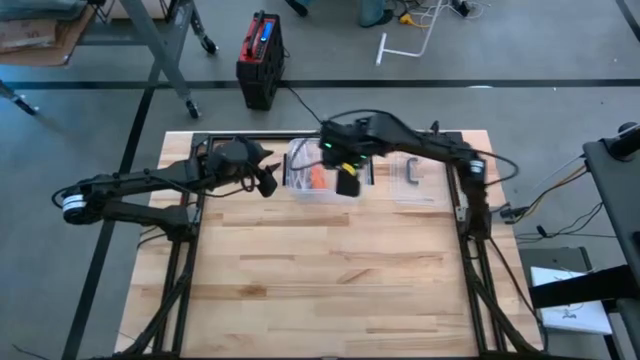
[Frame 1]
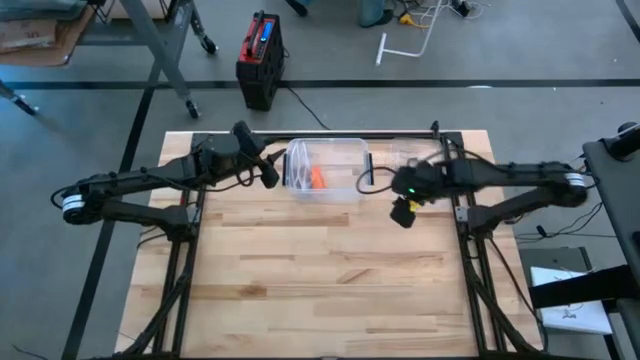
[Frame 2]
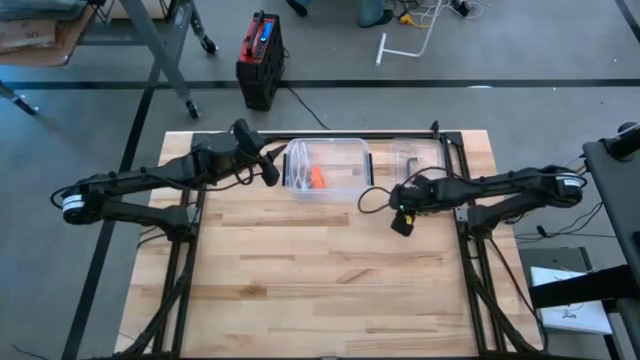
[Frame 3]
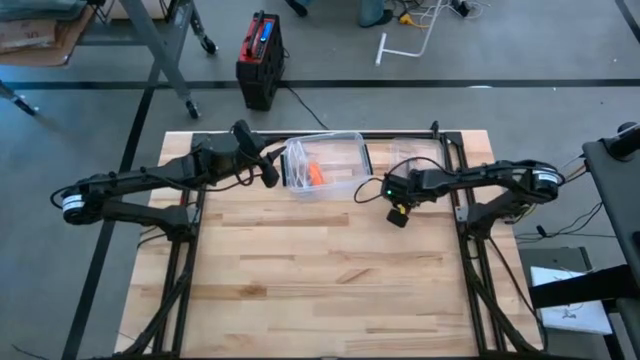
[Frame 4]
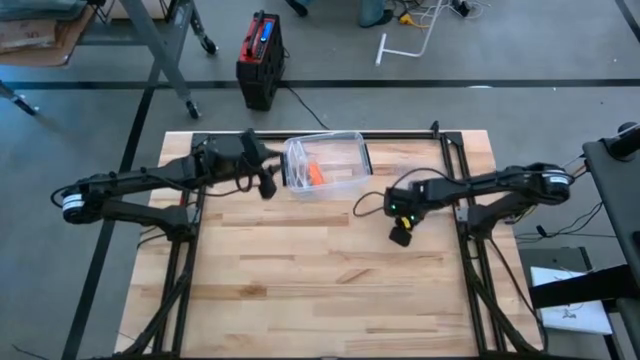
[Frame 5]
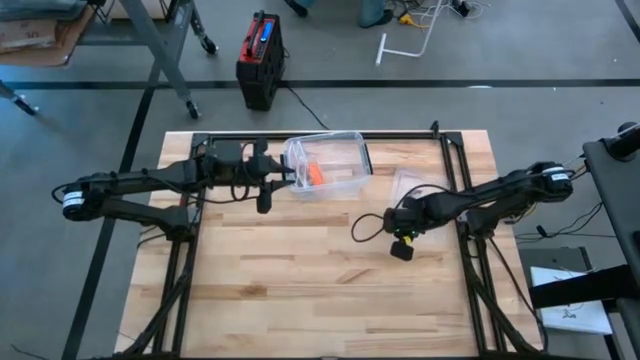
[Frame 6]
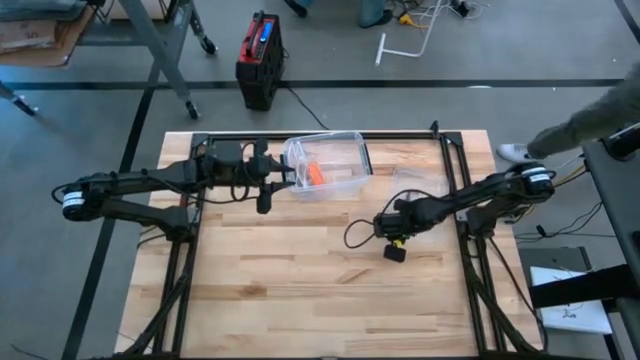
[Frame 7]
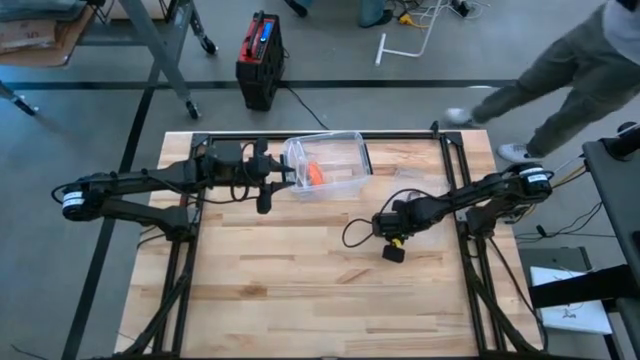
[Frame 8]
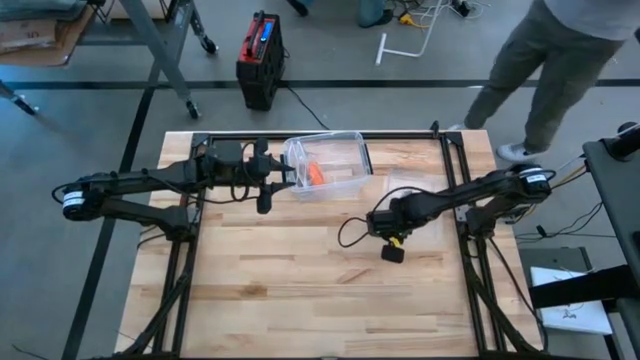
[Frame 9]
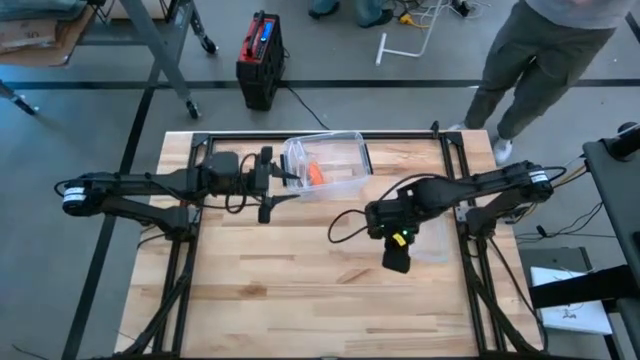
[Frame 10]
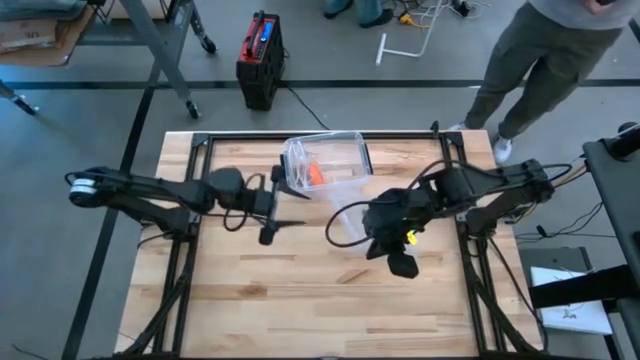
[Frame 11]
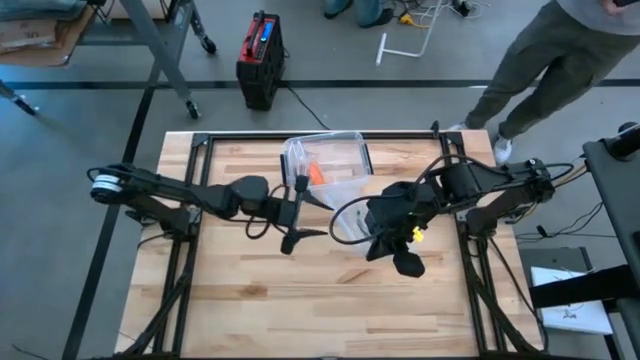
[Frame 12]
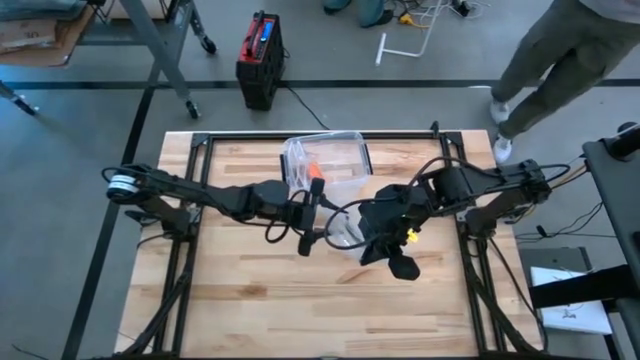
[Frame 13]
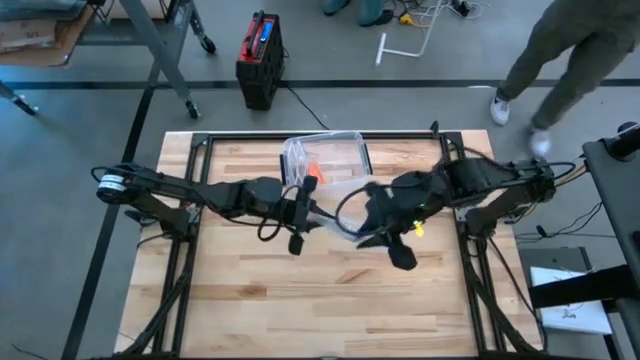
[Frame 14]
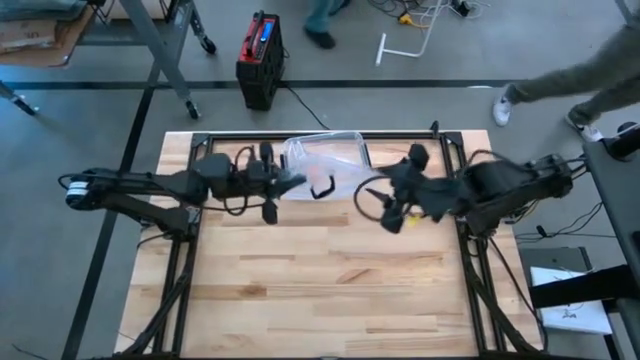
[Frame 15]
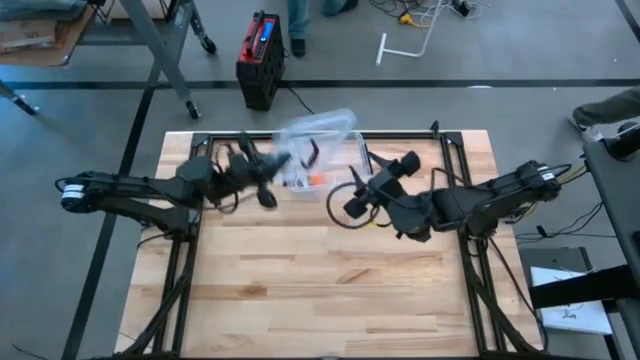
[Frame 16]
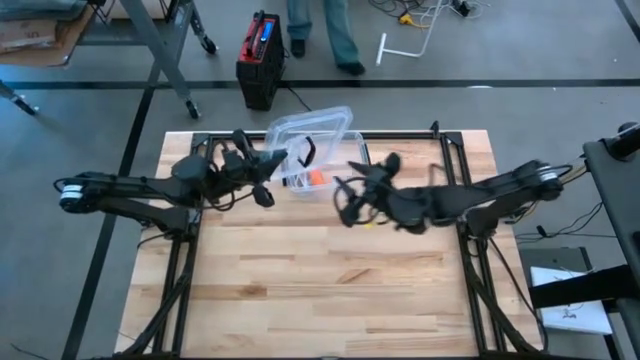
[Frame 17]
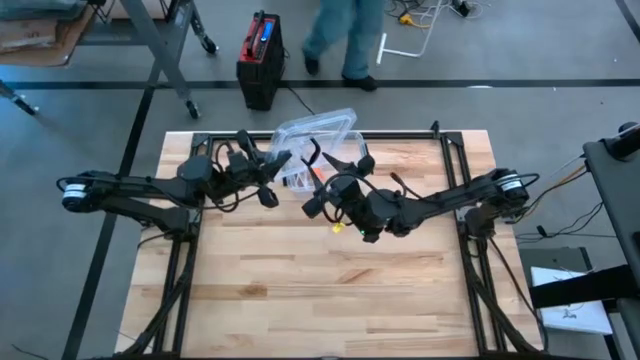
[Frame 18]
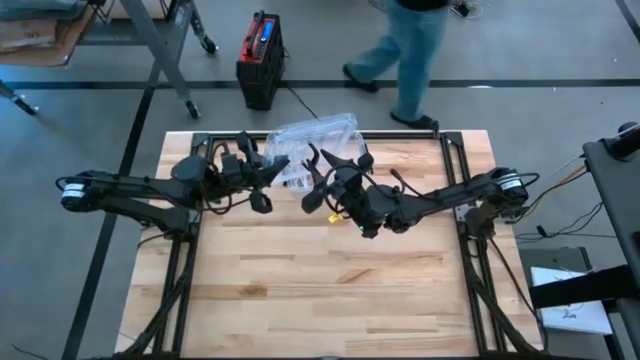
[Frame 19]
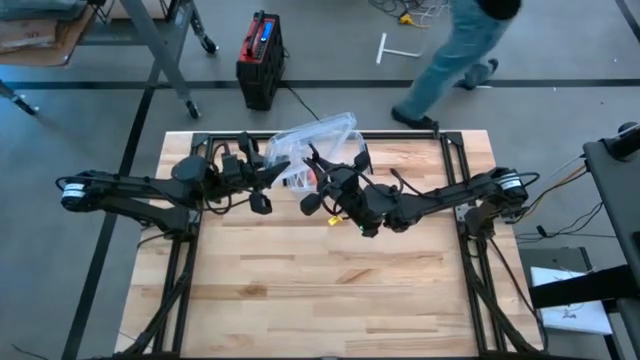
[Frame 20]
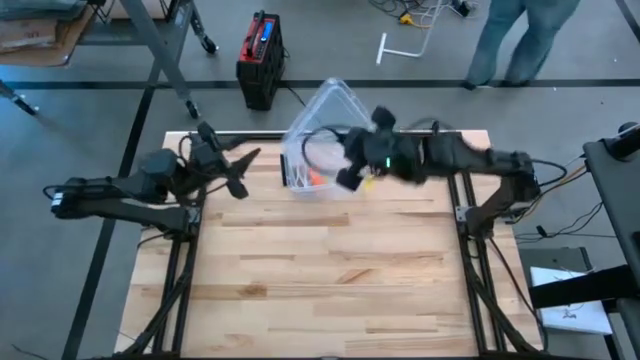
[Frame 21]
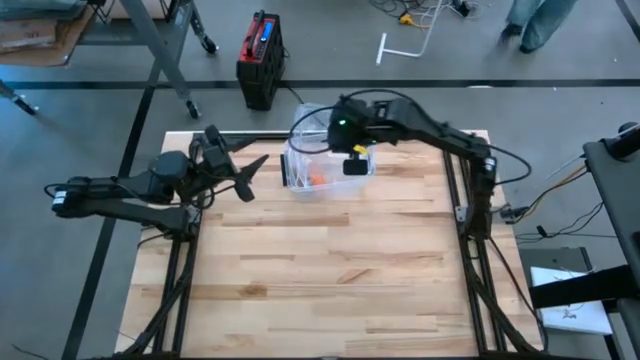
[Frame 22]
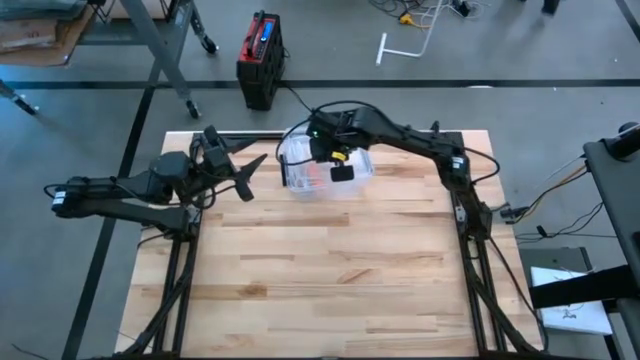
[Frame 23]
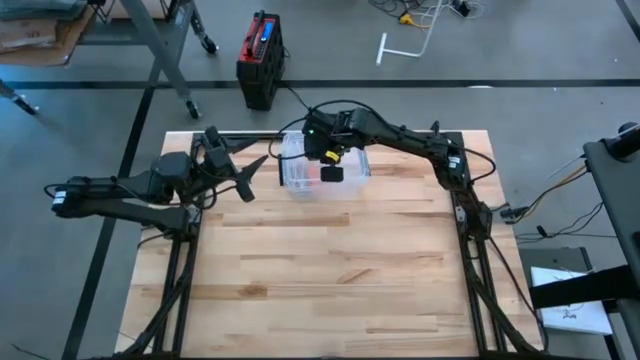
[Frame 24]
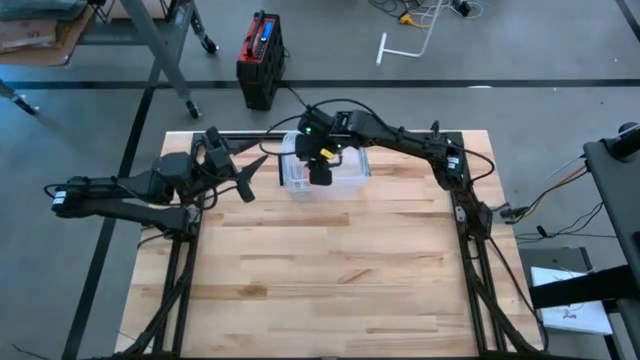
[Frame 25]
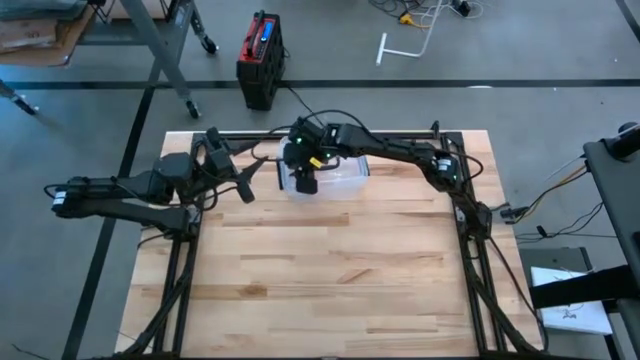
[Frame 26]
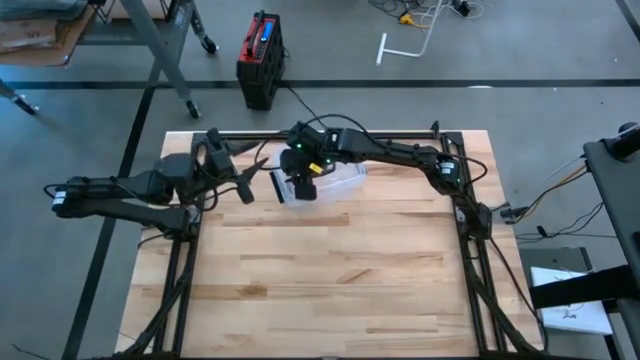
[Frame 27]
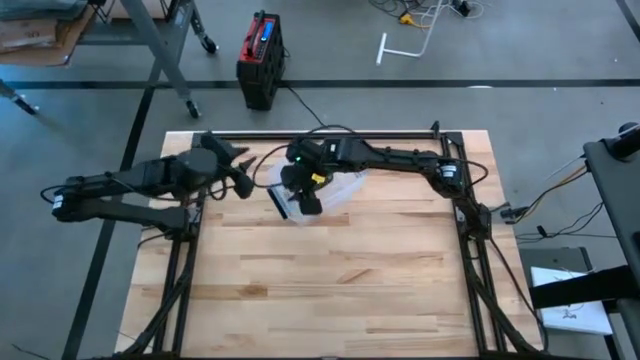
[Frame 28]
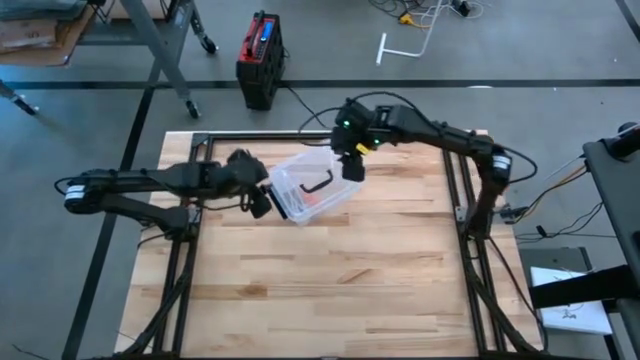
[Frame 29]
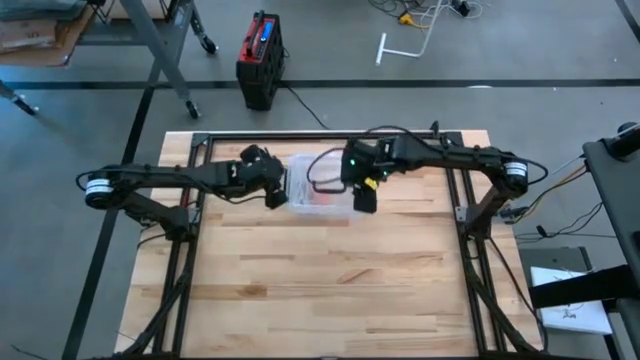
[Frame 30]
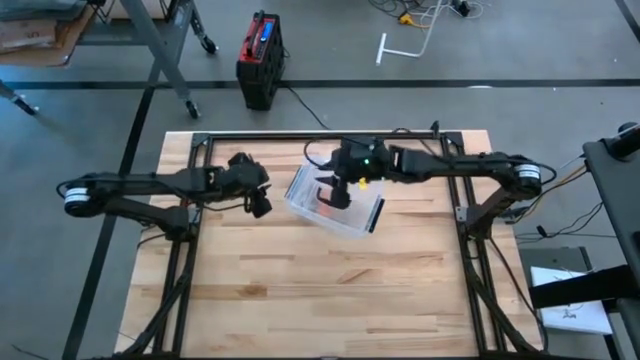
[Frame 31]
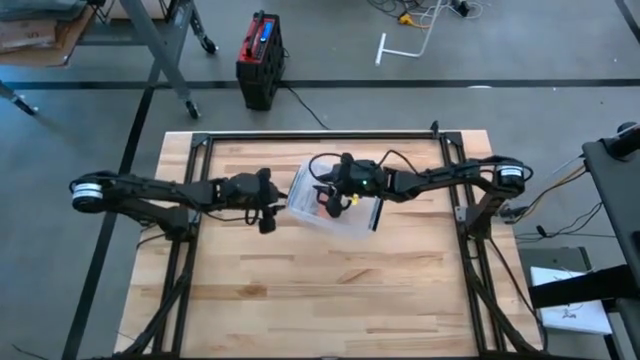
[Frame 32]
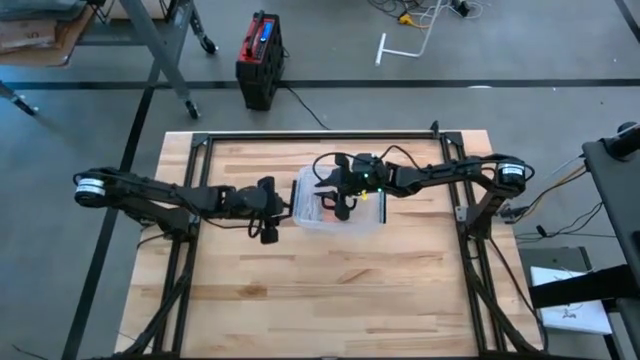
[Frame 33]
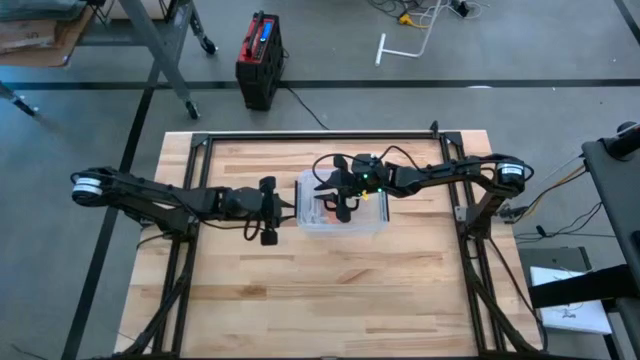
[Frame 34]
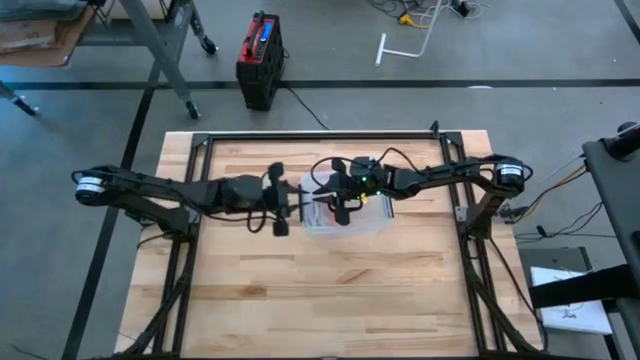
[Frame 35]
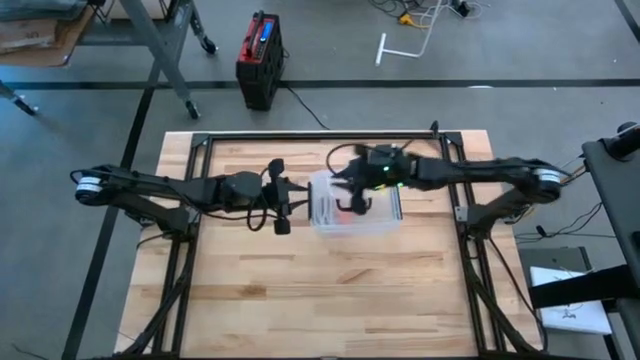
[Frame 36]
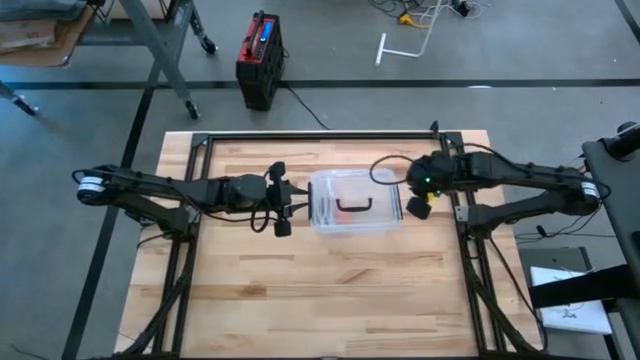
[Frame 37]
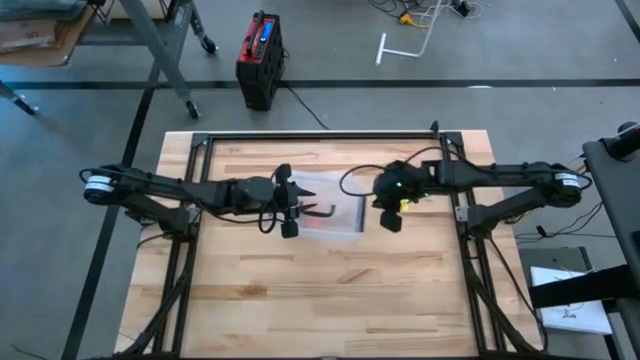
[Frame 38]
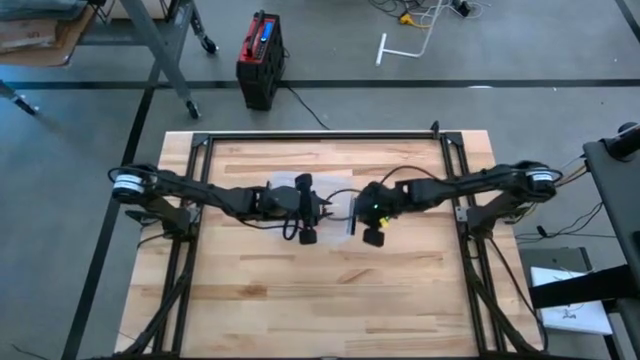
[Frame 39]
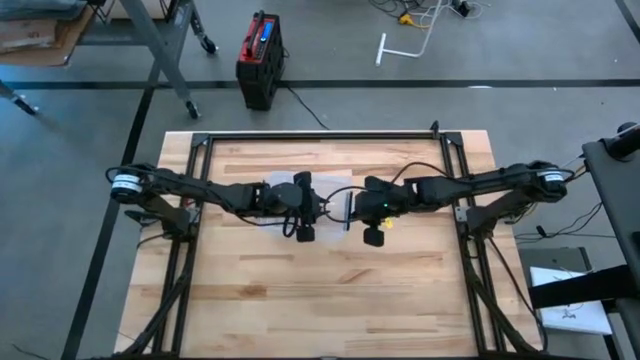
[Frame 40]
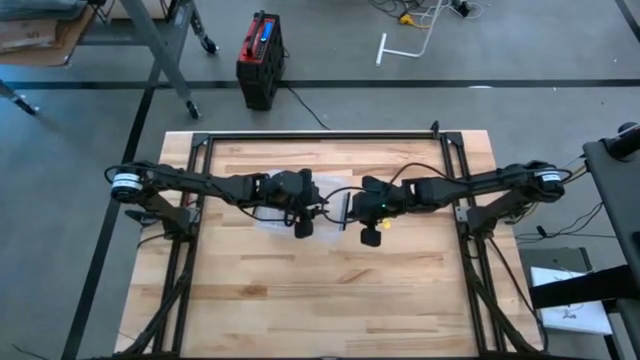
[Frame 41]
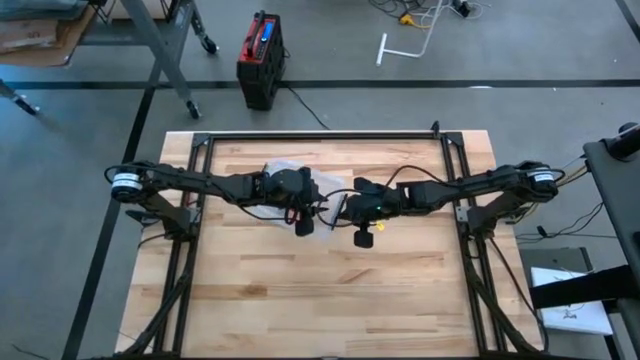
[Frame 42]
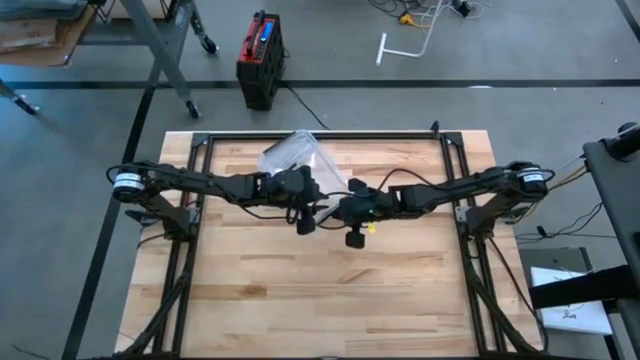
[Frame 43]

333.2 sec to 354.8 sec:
Task: Roll bandage
Close the transparent bin

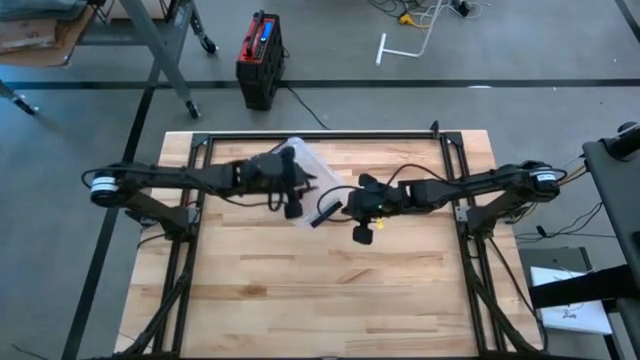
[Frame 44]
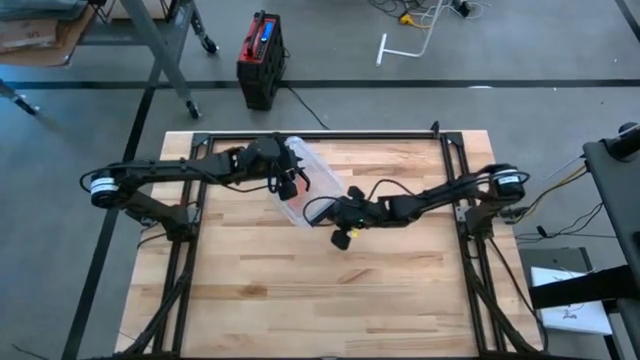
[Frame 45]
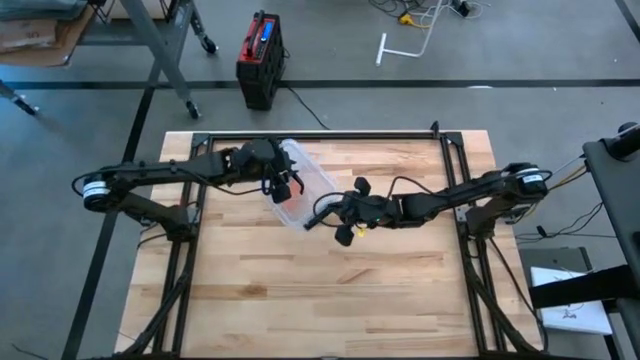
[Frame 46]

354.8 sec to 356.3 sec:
Close the transparent bin
